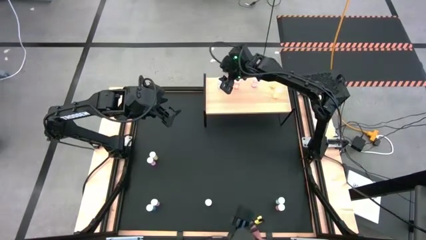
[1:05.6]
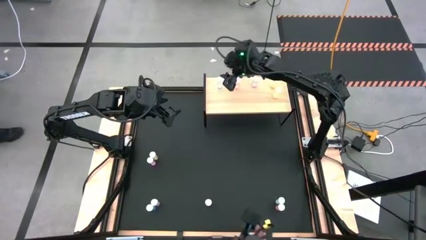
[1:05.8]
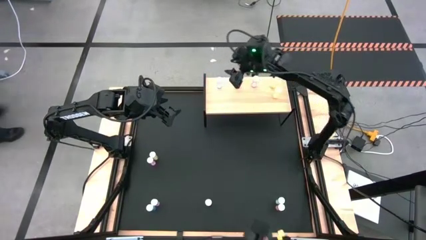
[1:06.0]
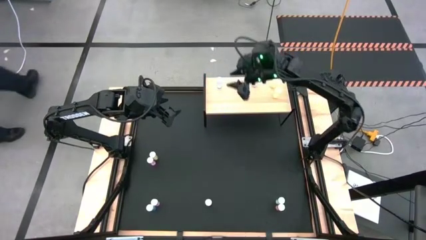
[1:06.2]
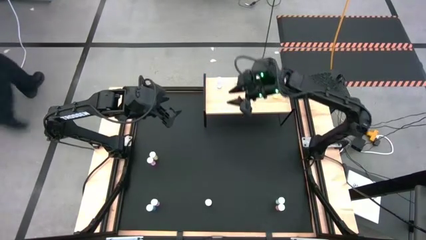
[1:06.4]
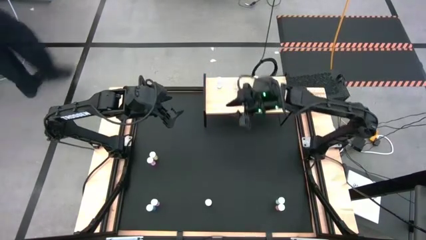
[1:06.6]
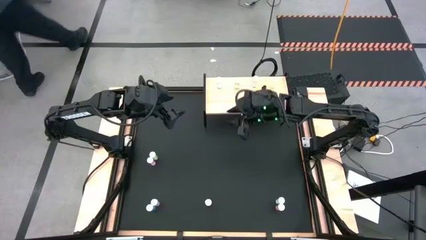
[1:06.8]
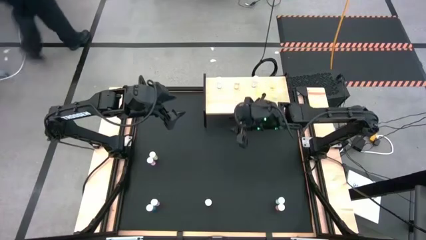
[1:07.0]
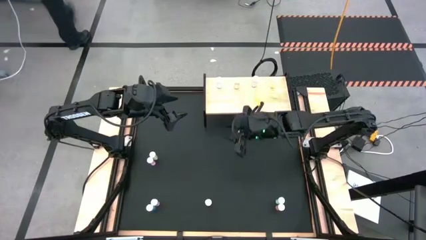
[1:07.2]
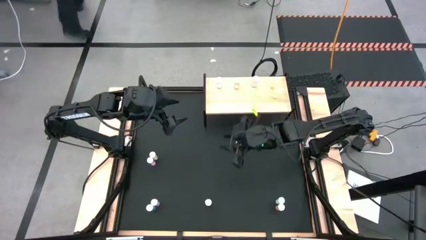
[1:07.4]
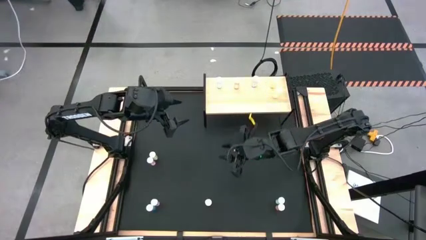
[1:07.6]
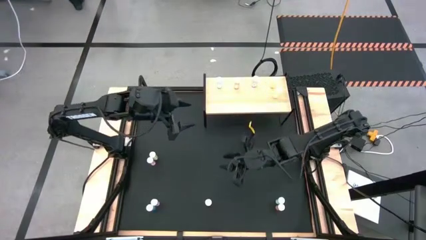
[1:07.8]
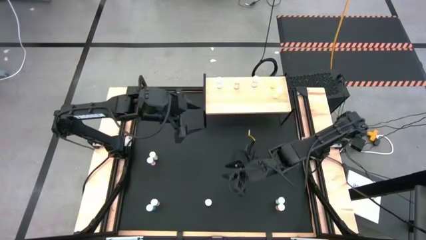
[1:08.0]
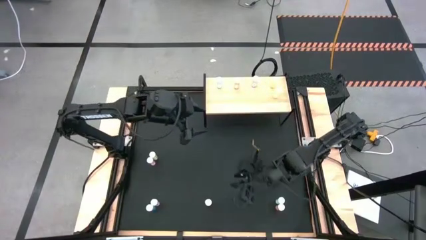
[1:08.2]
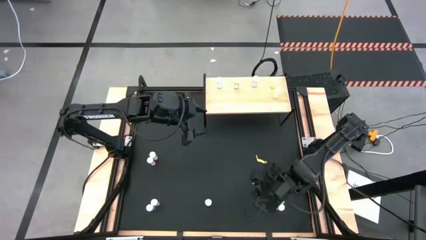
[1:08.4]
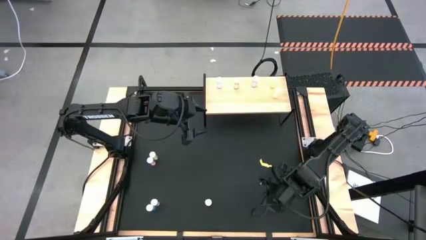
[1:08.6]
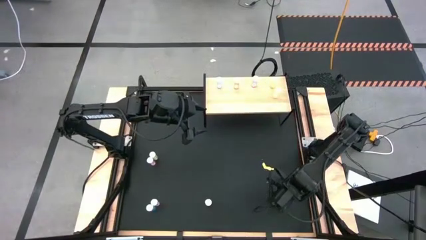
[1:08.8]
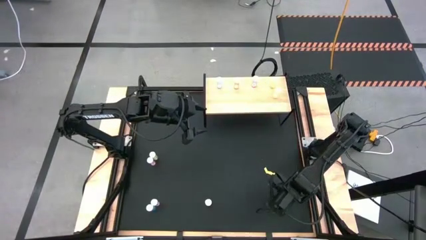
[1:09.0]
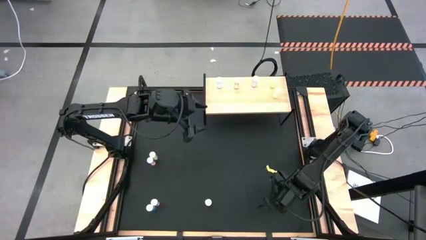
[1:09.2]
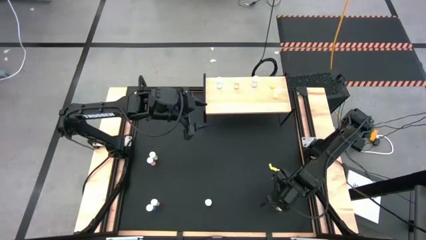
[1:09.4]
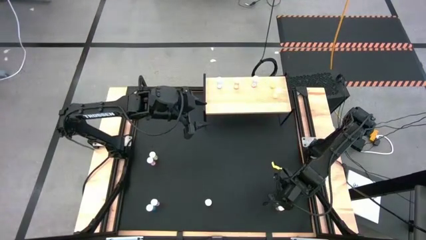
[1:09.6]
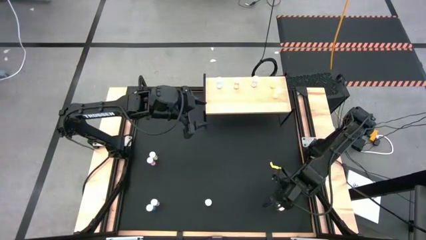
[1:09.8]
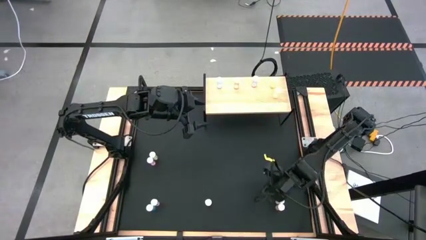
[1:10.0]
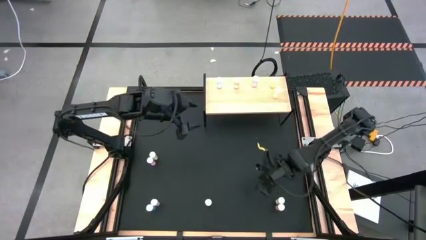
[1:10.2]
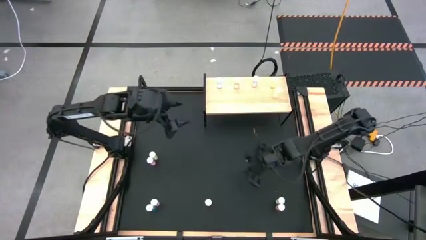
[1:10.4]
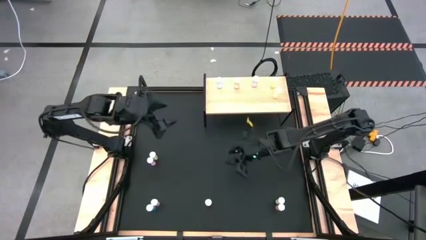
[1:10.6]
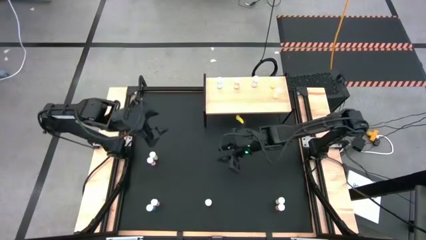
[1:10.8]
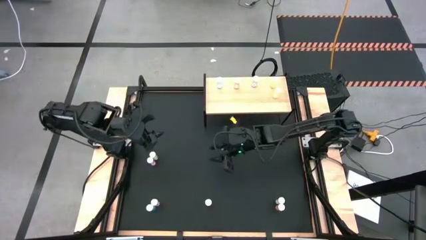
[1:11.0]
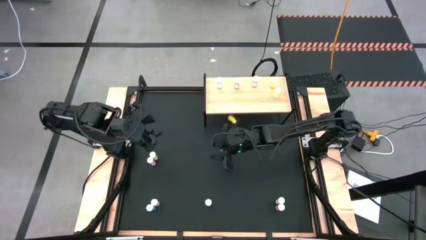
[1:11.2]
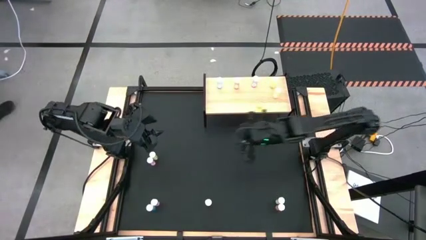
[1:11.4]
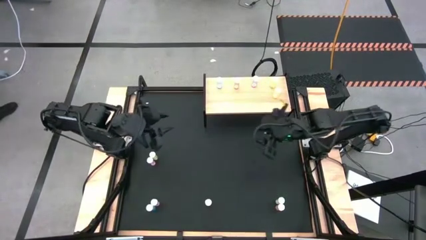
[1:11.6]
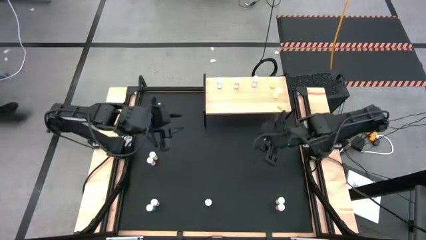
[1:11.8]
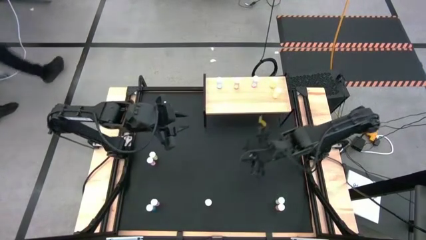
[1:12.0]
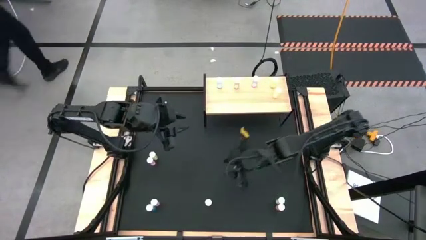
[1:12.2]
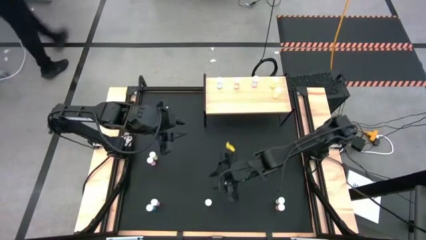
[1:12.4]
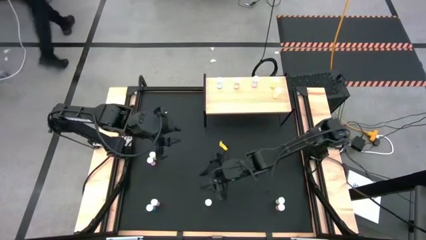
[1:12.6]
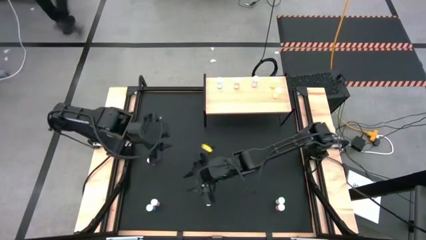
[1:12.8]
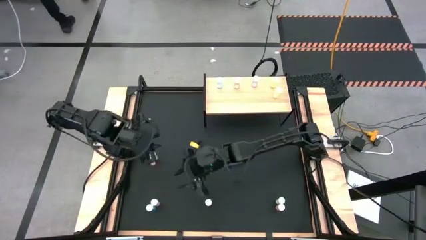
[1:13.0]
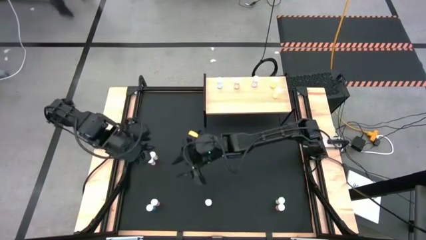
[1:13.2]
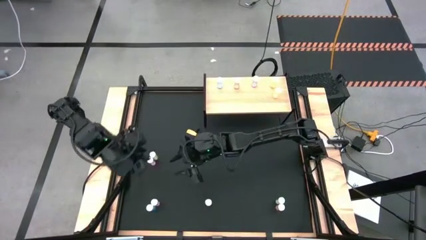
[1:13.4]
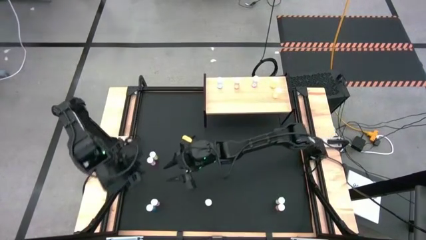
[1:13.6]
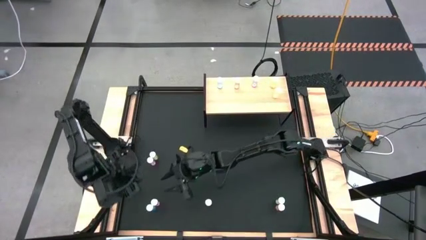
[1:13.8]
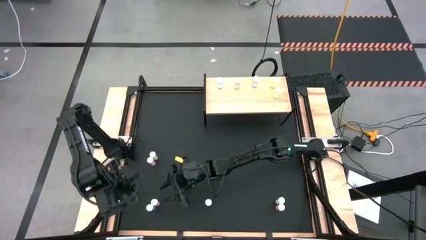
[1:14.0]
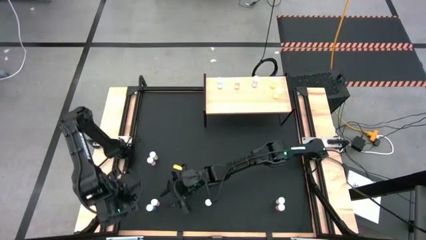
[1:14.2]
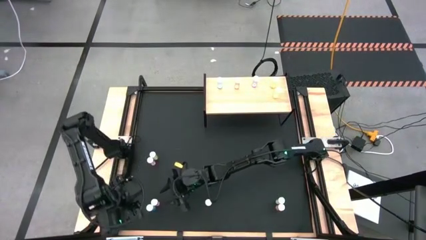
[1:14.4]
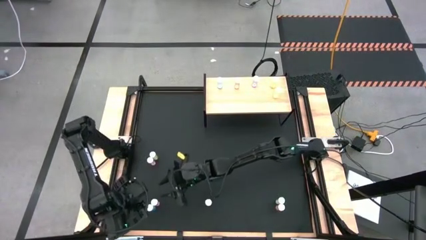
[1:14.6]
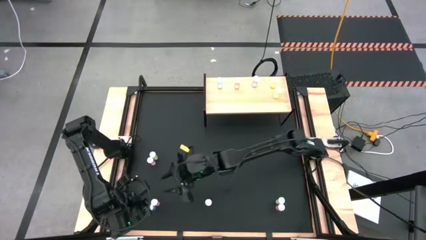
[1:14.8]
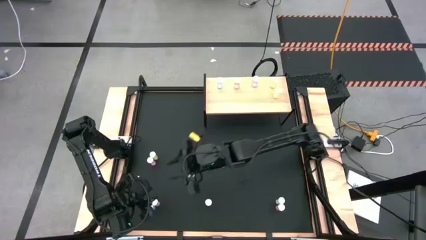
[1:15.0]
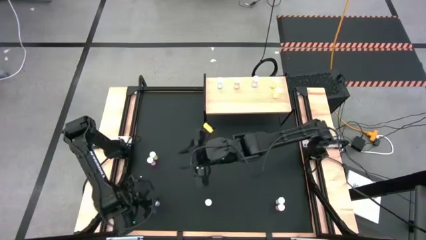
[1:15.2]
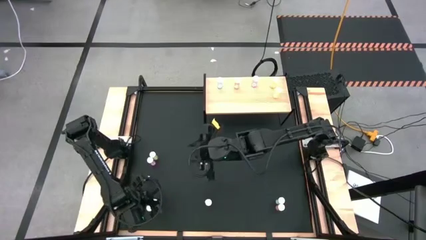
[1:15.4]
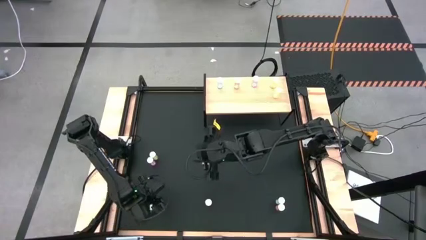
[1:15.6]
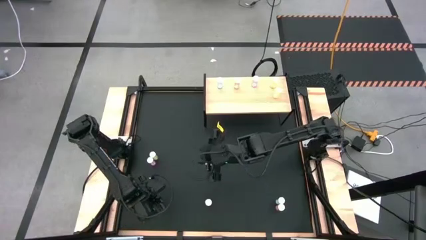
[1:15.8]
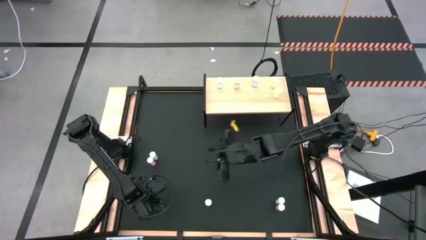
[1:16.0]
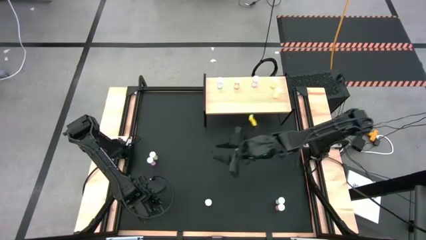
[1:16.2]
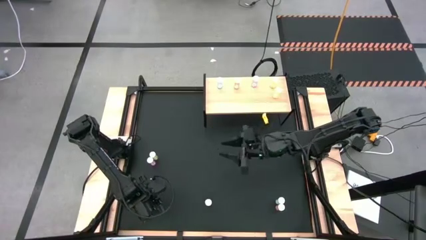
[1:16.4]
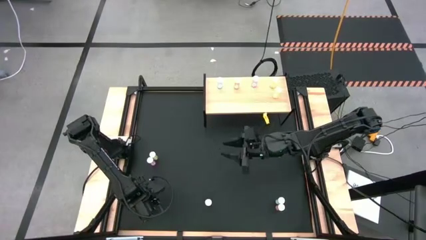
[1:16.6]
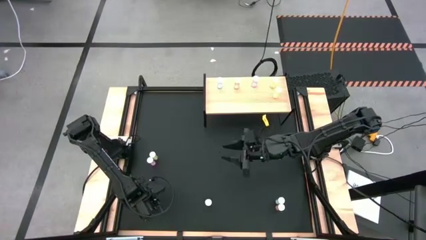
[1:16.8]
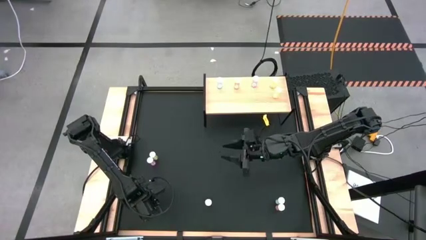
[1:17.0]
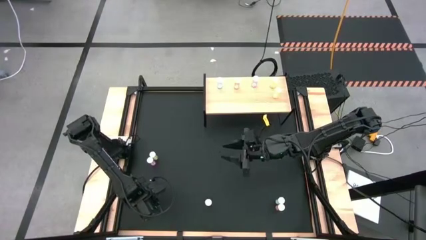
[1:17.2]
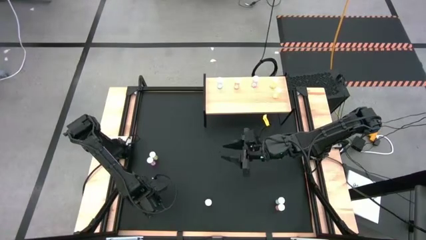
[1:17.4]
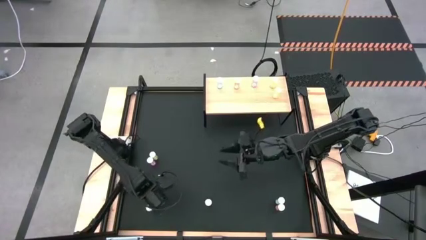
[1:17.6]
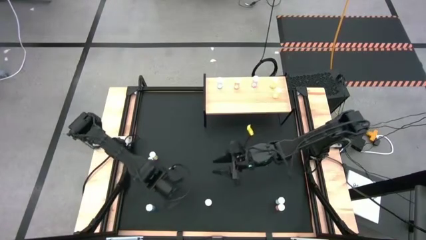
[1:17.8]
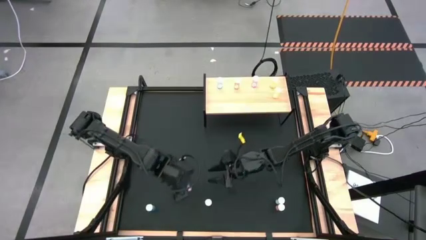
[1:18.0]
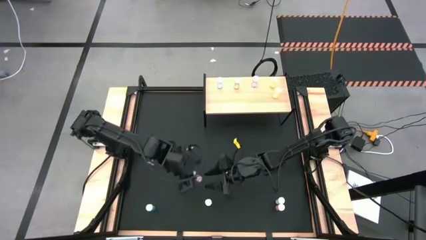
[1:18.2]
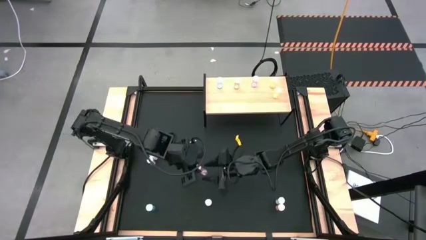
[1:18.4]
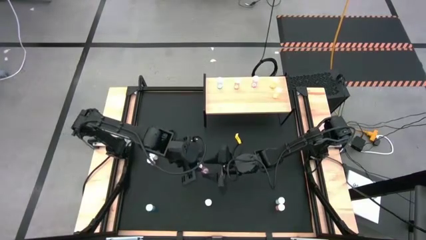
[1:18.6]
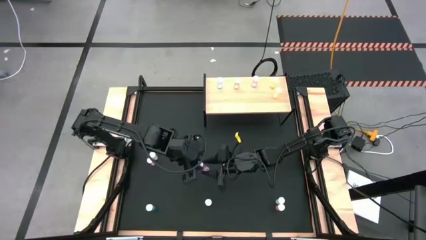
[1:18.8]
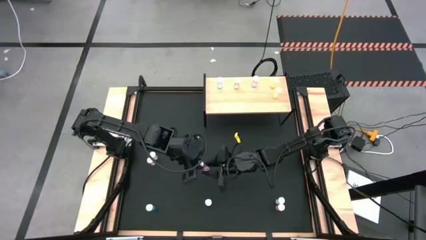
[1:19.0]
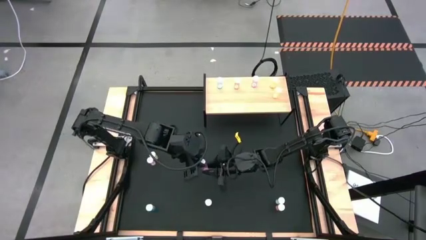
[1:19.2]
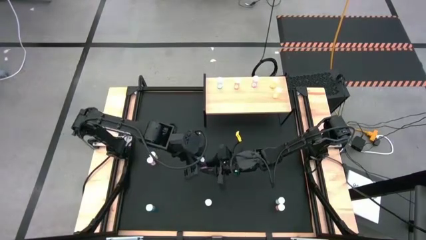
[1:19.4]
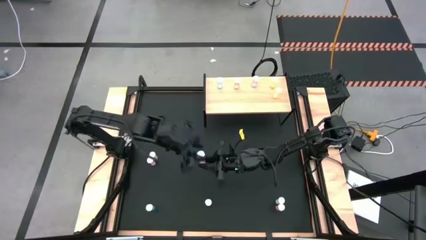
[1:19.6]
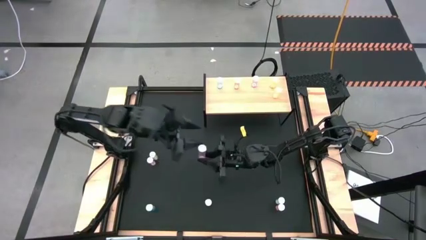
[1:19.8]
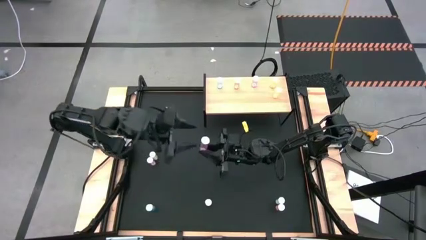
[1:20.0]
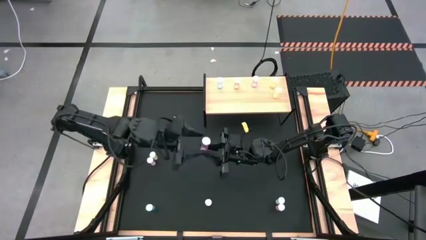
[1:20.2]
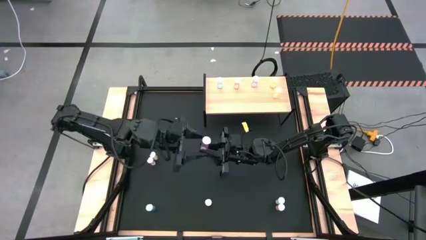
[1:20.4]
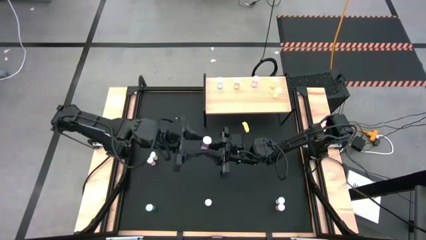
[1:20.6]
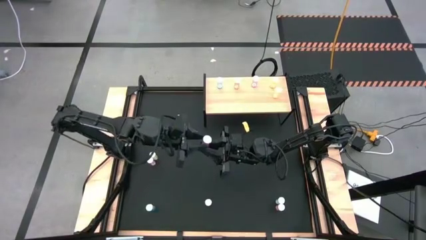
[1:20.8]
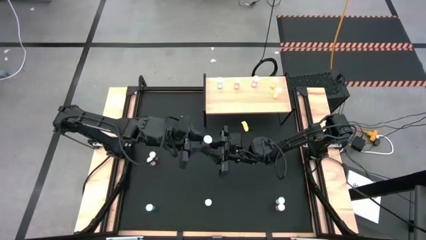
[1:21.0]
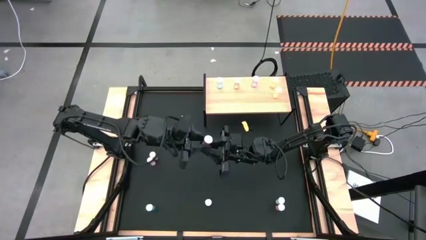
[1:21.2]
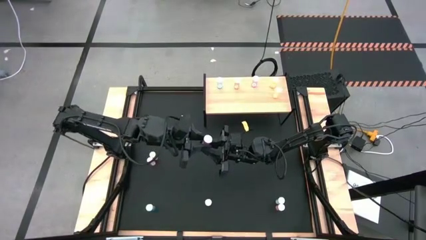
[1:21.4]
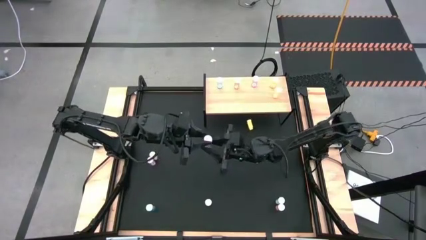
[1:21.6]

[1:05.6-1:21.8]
Task: Pick and place medicine bottles onto shelf by color
Put the bottom pink pill bottle on the shelf aligned with the other pink pill bottle

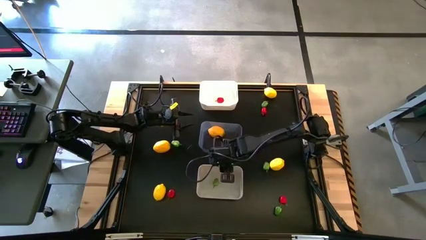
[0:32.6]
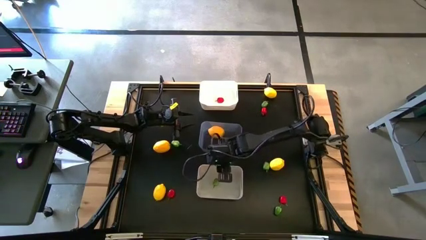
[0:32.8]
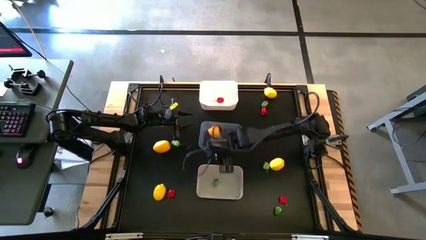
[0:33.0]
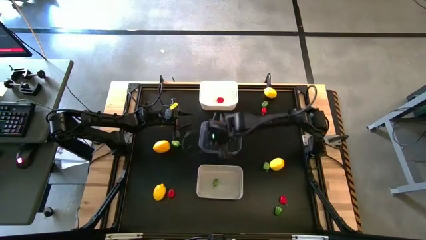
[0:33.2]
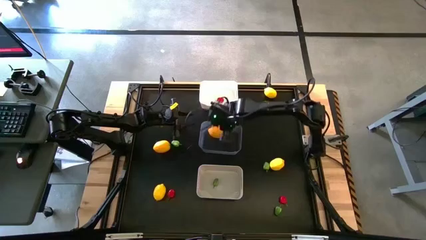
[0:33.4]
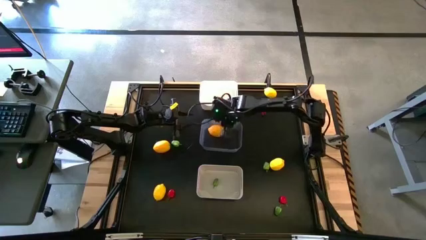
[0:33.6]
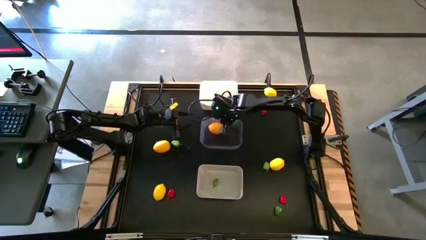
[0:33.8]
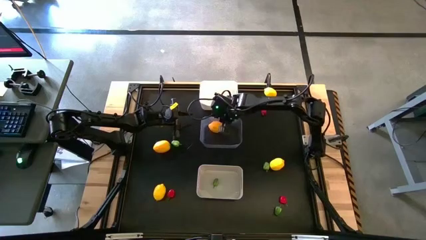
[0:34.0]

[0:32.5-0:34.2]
Task: Sort produce into baskets
Adjust the transparent bin
